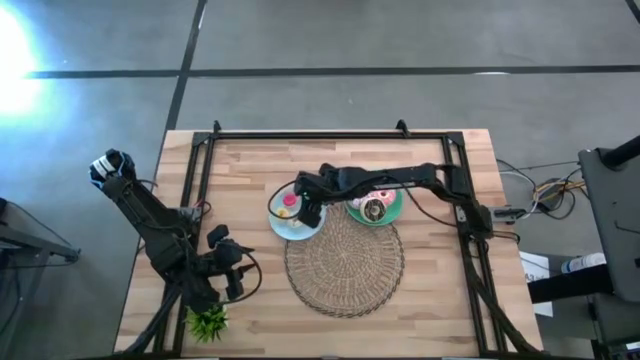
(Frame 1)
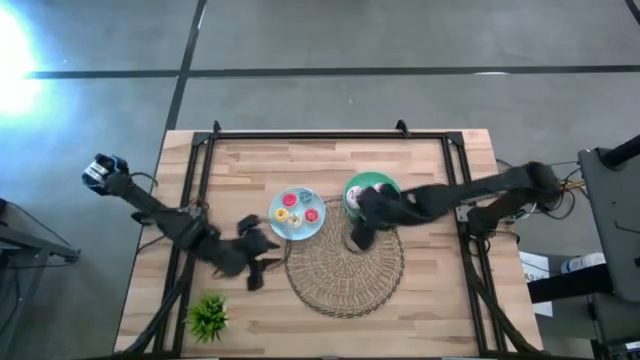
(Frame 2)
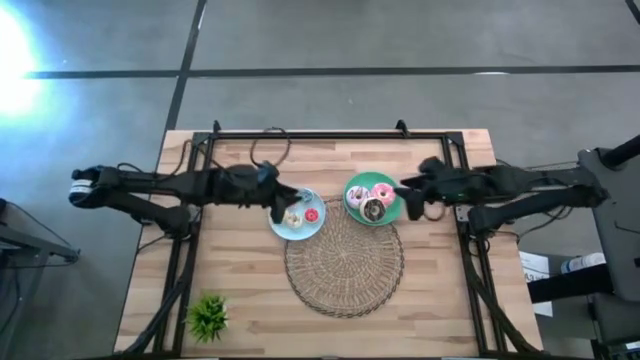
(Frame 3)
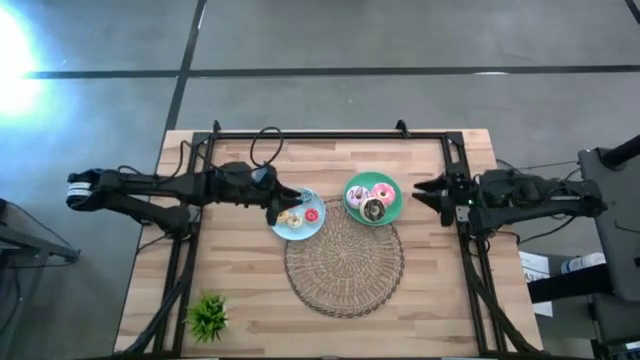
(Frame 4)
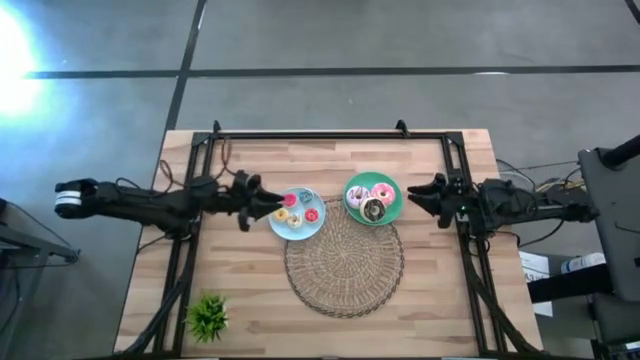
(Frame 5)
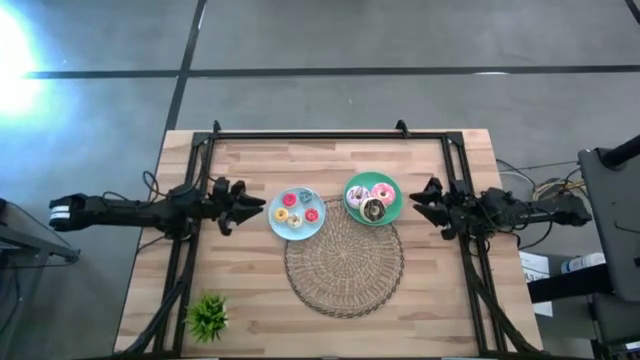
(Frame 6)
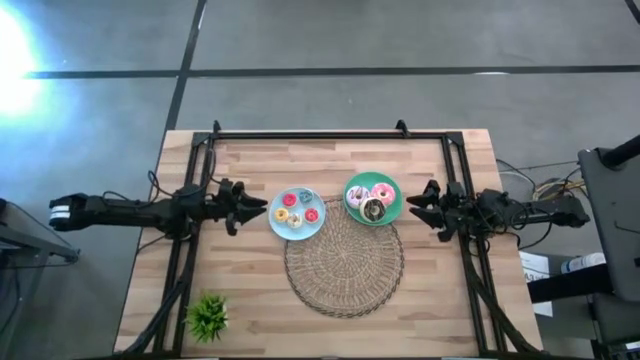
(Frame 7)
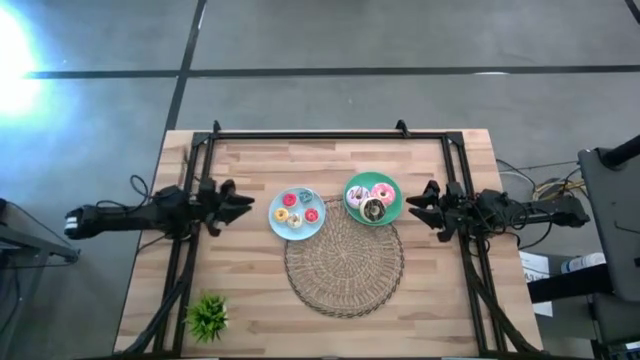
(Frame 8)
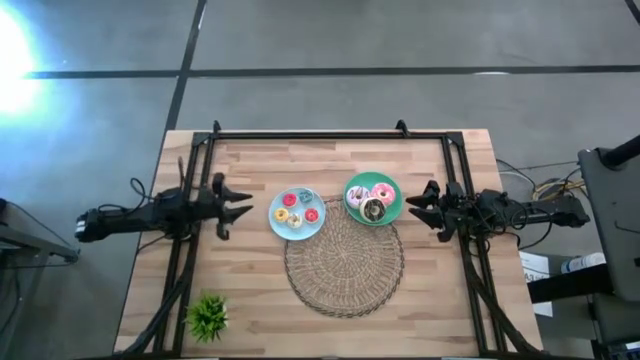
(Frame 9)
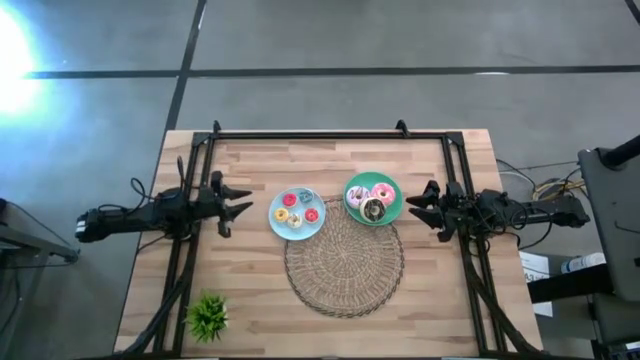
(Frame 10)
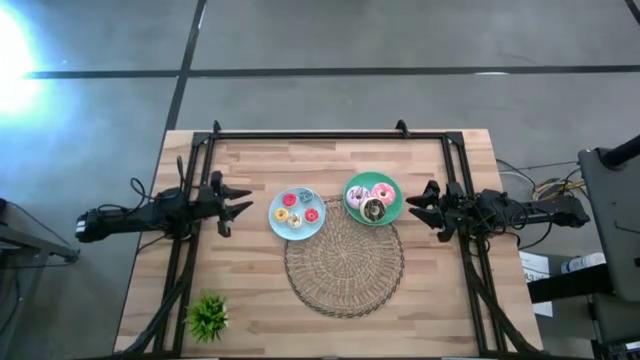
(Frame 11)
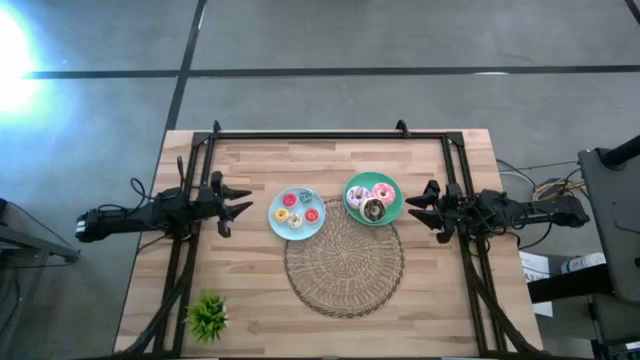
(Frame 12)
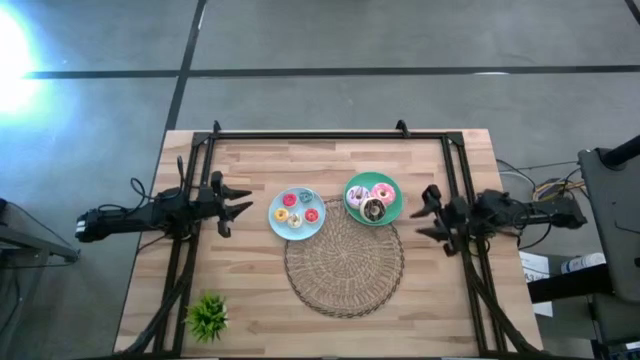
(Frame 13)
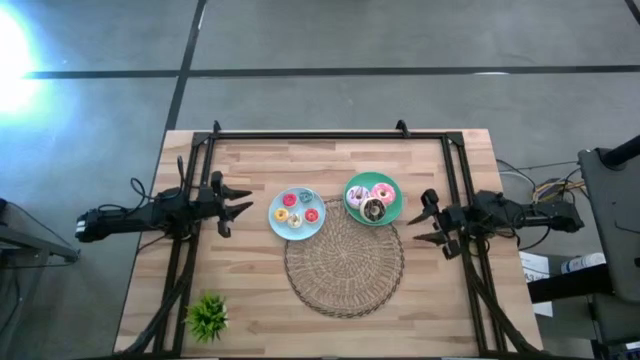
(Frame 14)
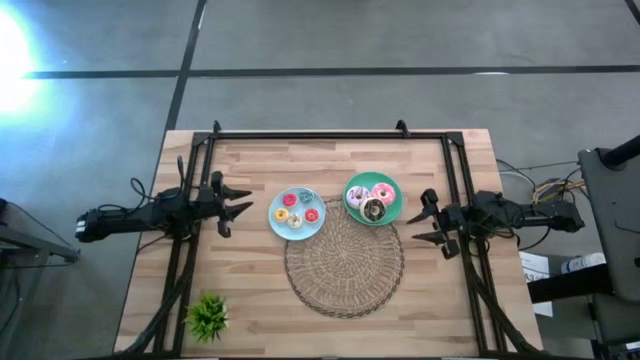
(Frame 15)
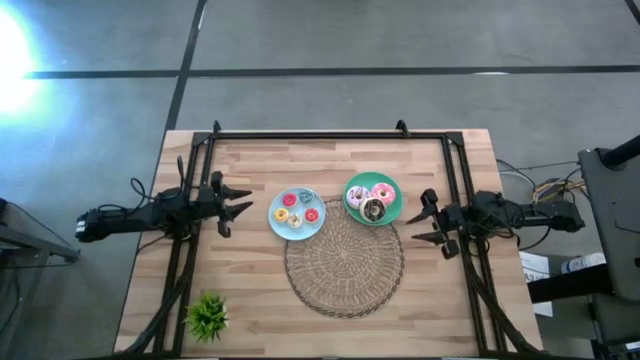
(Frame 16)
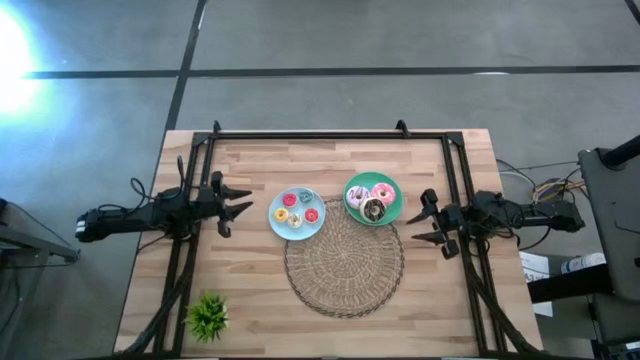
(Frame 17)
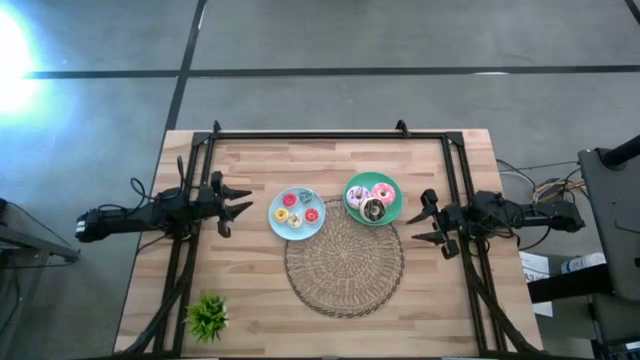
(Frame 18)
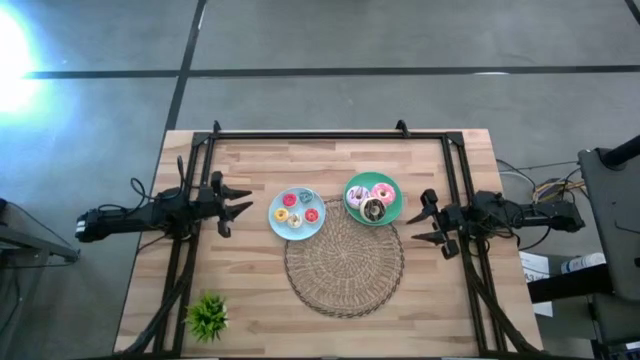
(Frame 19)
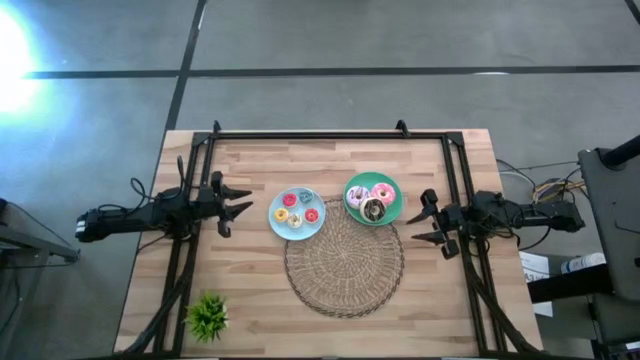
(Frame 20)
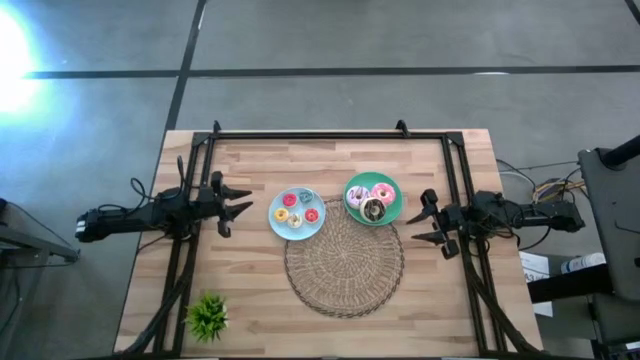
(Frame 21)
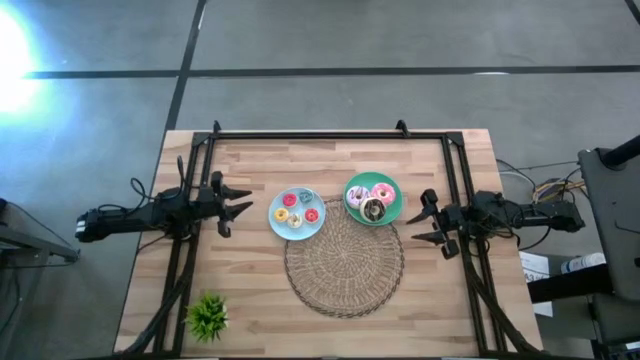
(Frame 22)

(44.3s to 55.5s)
Task: Pick & Place donuts
Return to Home Position

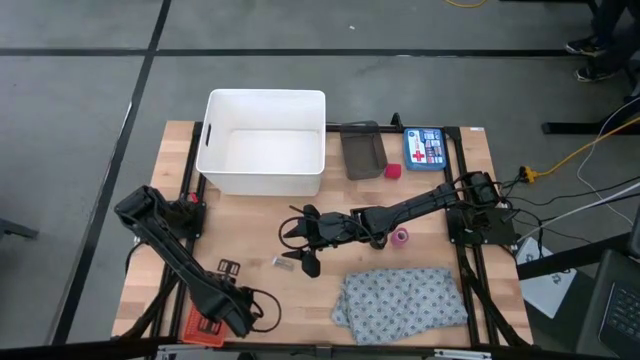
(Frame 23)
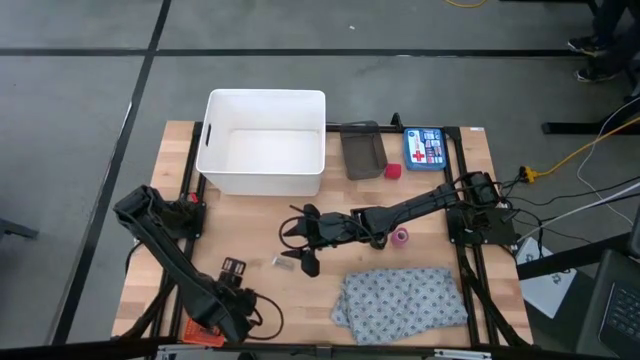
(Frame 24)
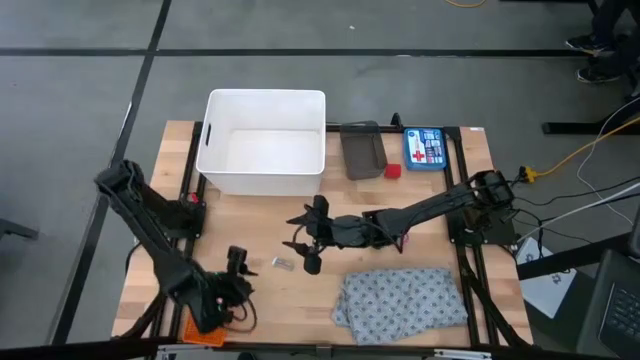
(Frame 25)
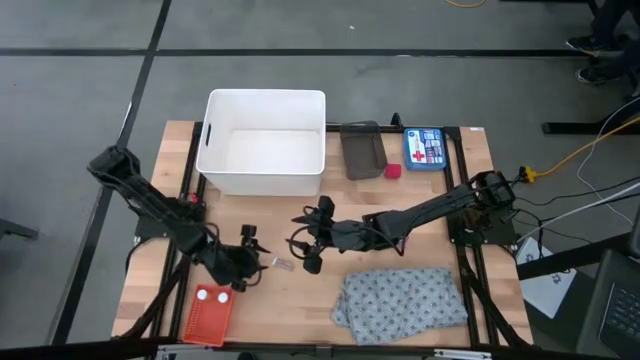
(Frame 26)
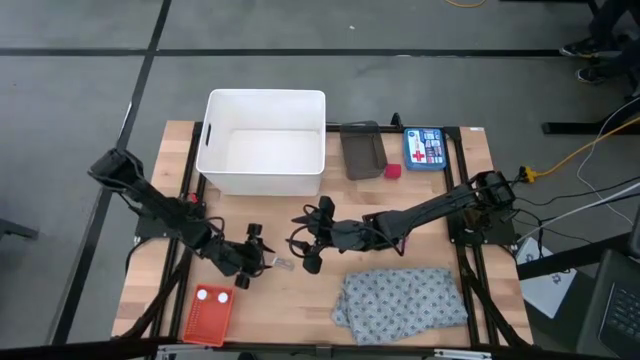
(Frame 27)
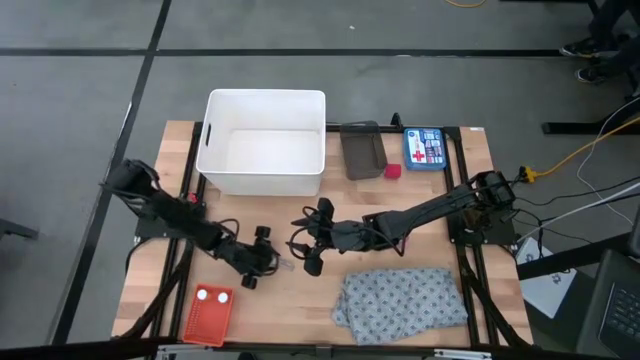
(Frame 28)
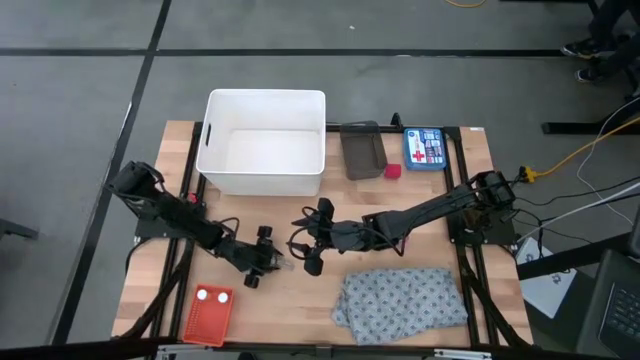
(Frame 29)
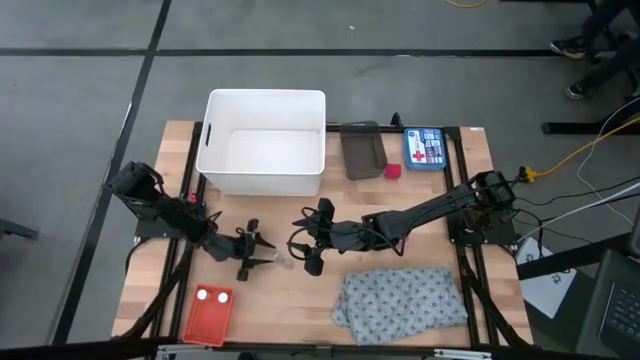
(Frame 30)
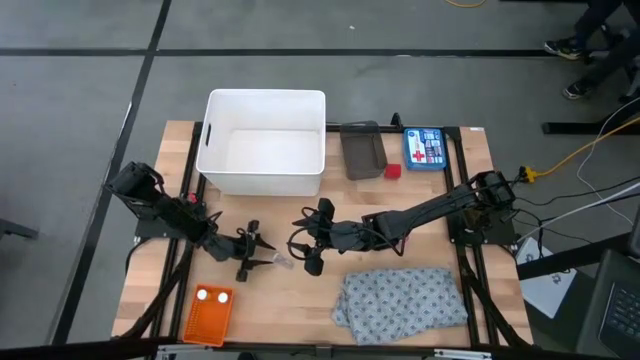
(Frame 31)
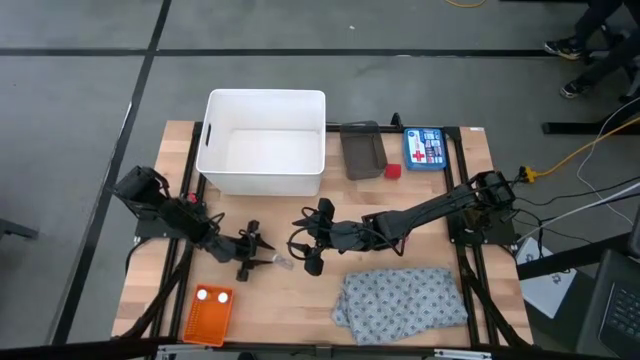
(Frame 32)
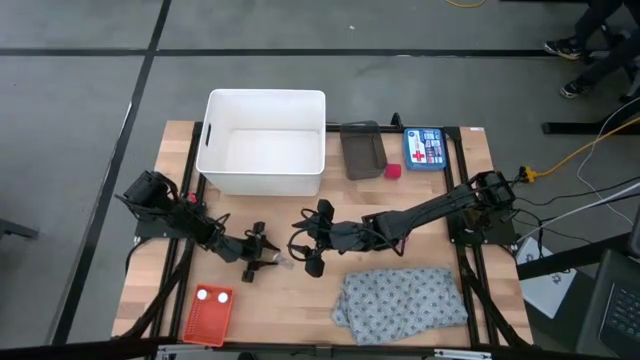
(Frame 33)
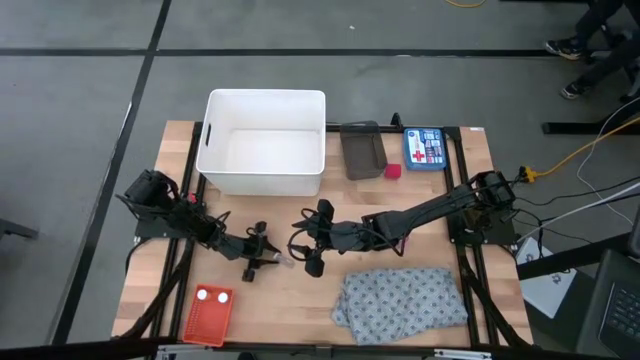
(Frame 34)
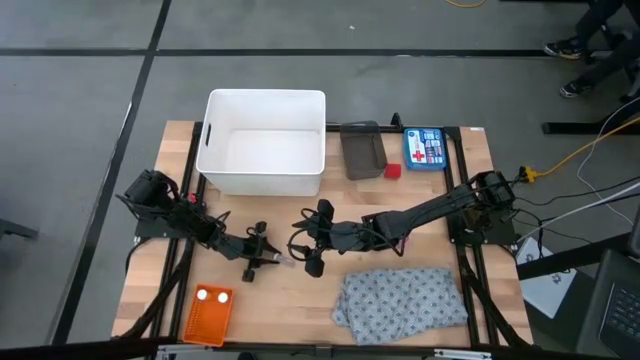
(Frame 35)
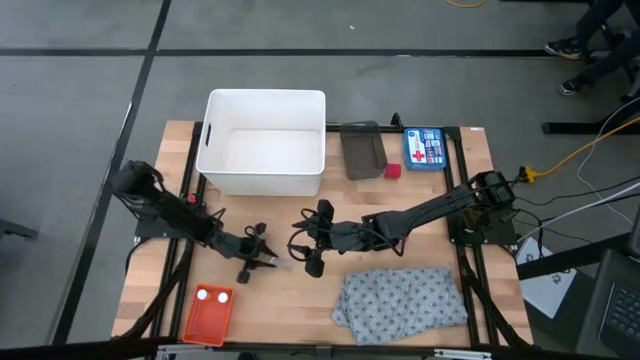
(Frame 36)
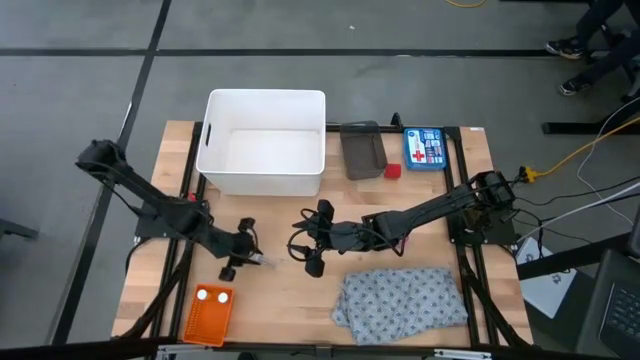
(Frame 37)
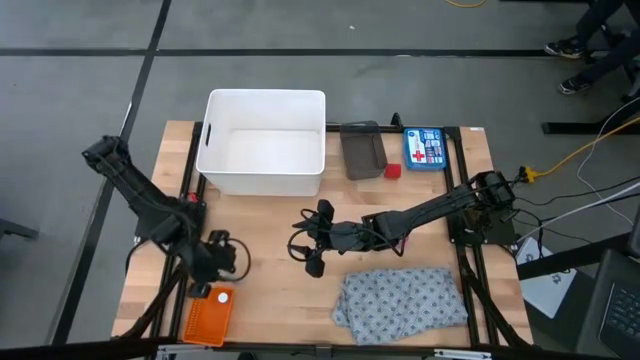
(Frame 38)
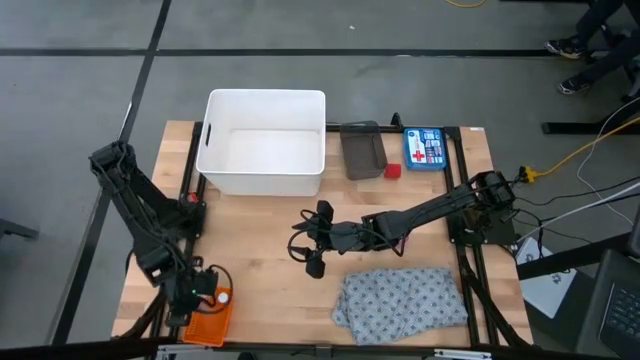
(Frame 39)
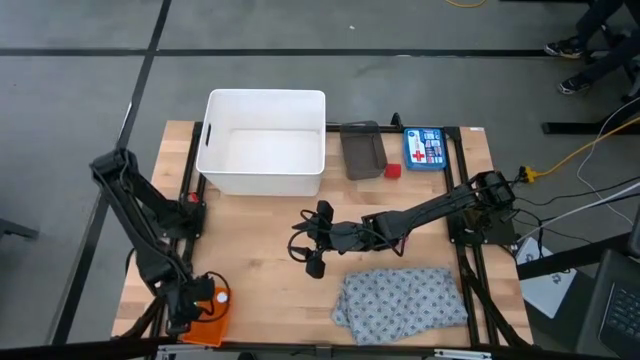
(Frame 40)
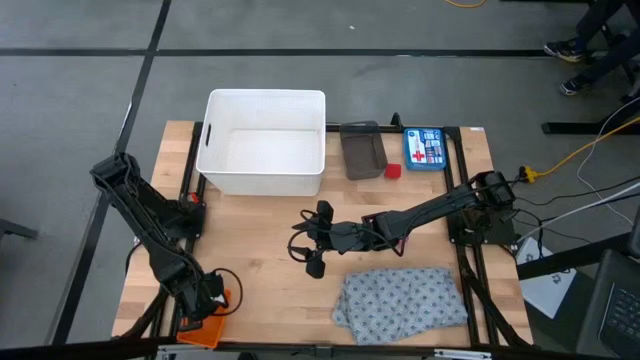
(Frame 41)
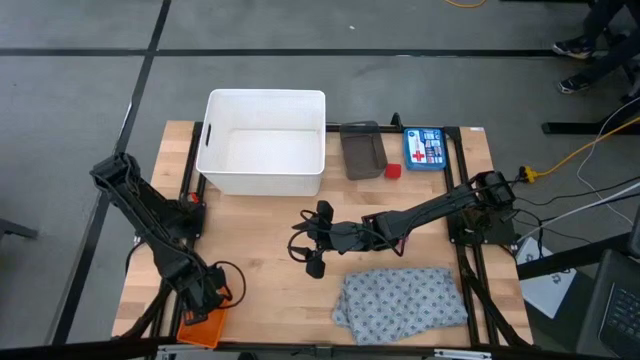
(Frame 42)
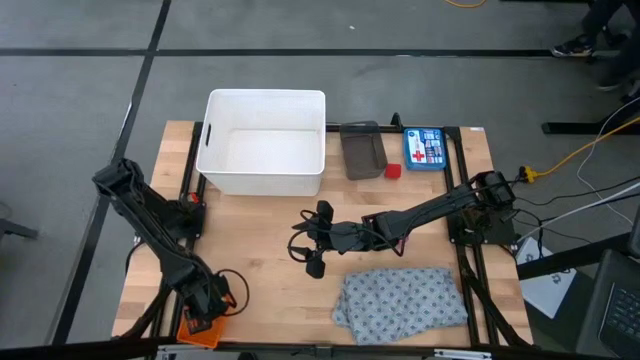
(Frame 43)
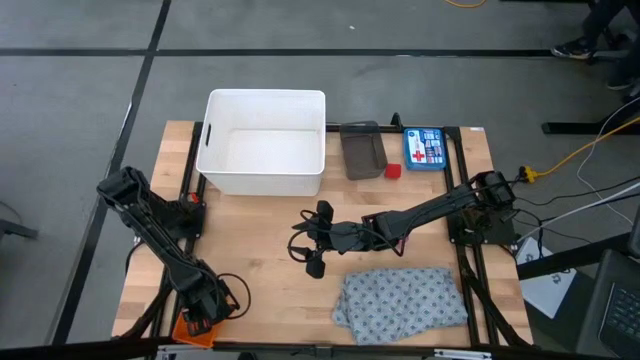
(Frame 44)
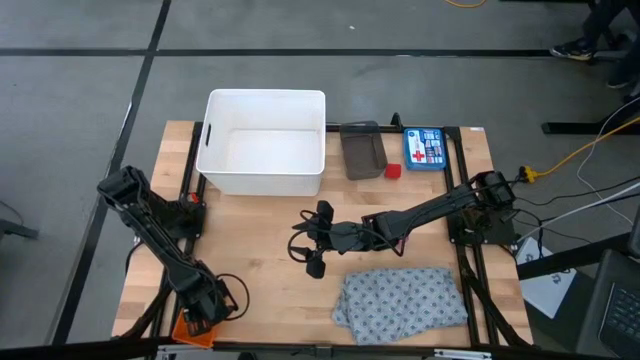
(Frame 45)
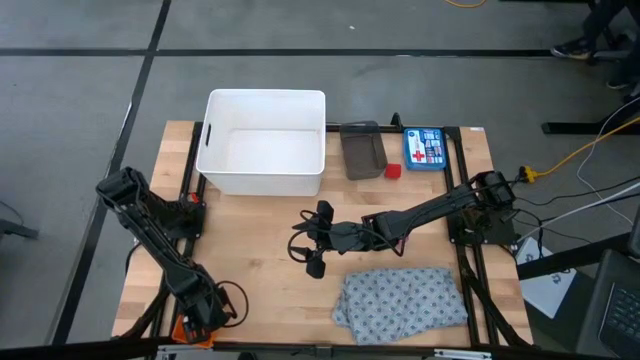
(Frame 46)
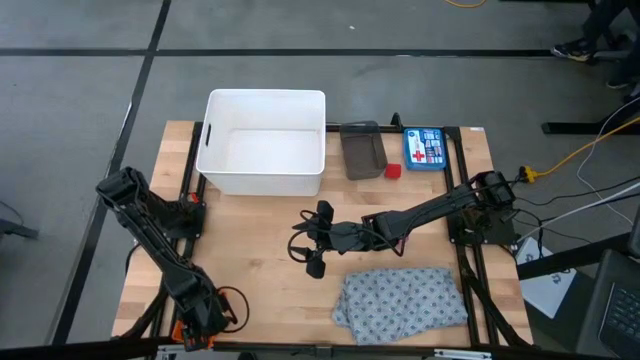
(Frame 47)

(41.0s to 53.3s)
Task: Pick & place medical supplies in basket/bin
Put the blue pill bottle into the orange bin
